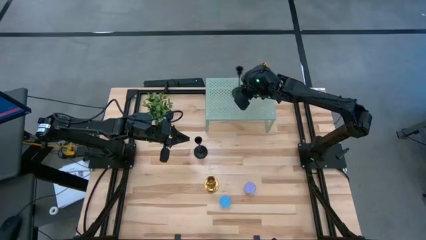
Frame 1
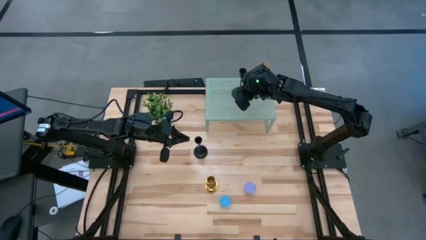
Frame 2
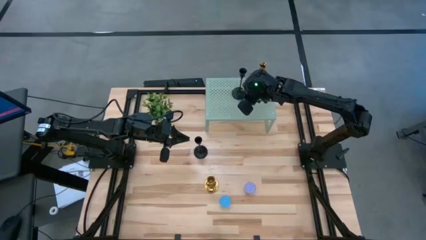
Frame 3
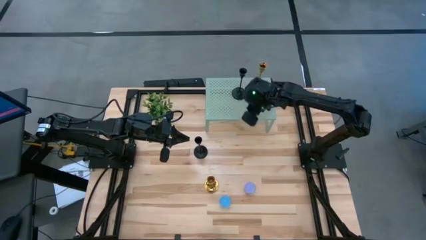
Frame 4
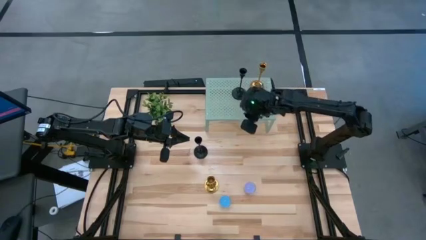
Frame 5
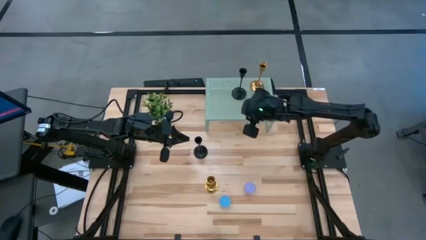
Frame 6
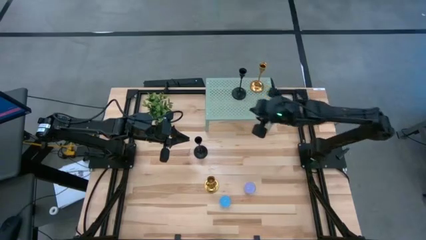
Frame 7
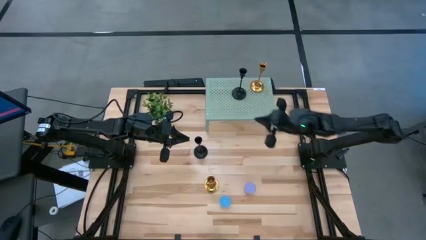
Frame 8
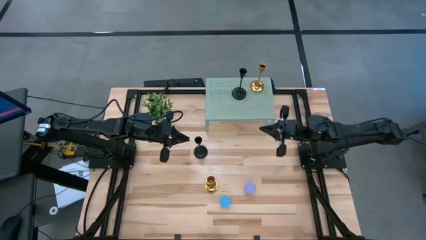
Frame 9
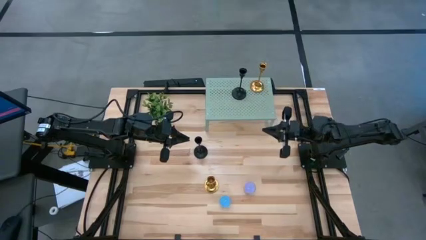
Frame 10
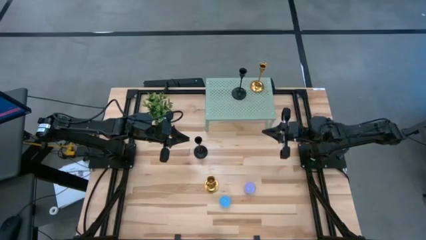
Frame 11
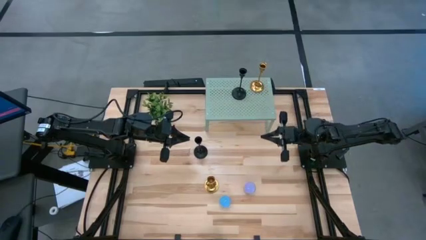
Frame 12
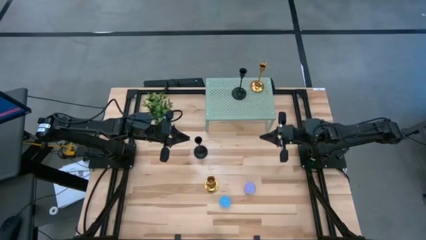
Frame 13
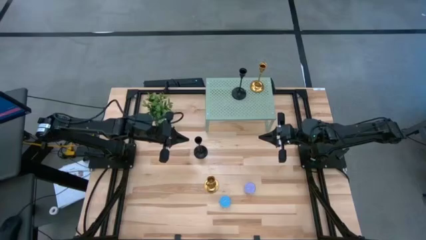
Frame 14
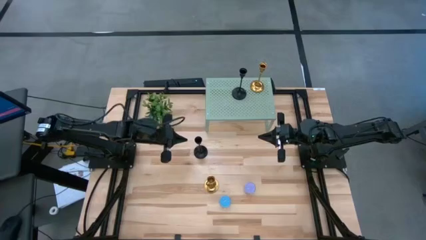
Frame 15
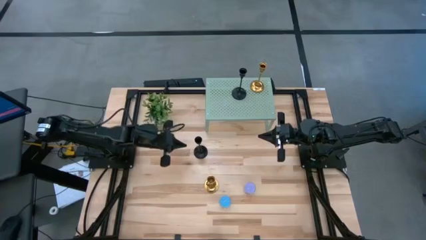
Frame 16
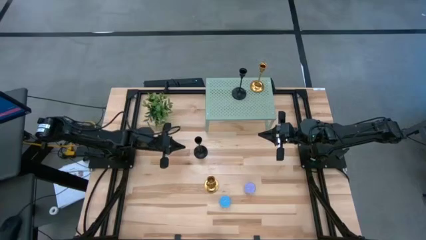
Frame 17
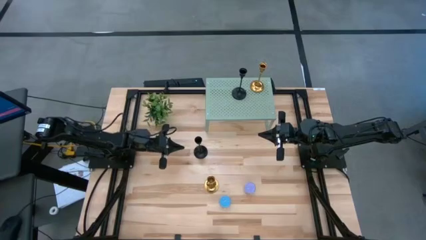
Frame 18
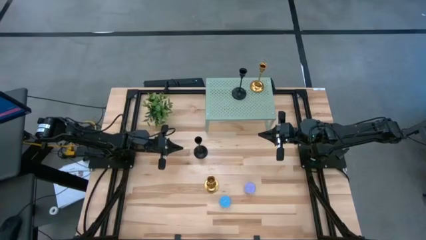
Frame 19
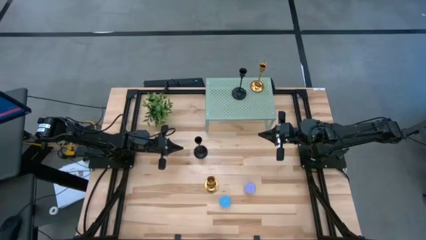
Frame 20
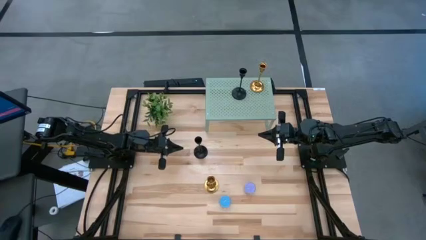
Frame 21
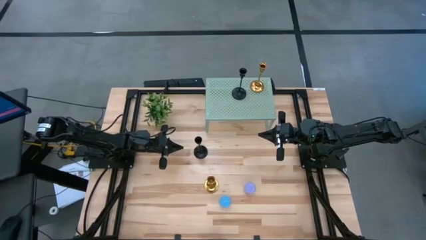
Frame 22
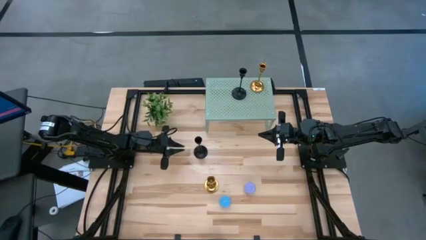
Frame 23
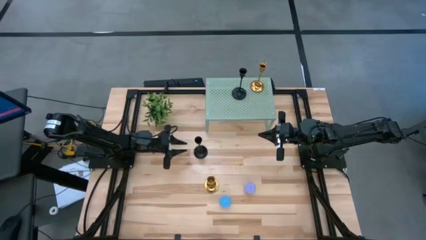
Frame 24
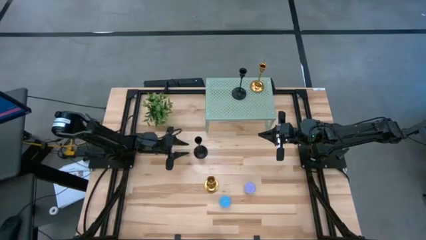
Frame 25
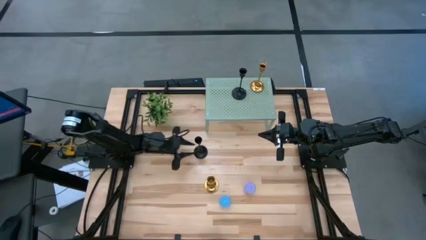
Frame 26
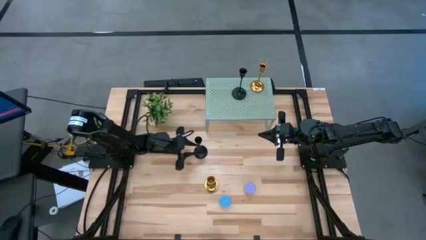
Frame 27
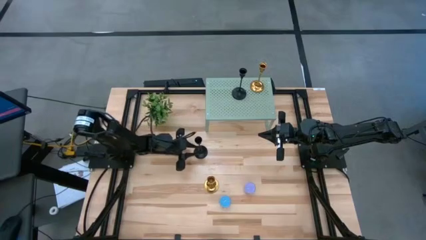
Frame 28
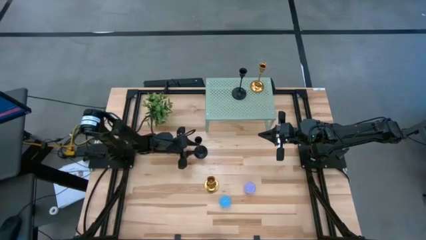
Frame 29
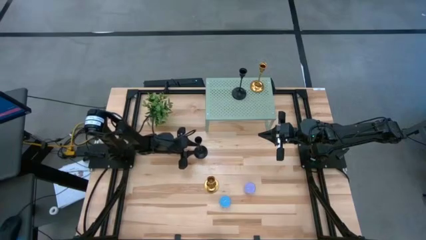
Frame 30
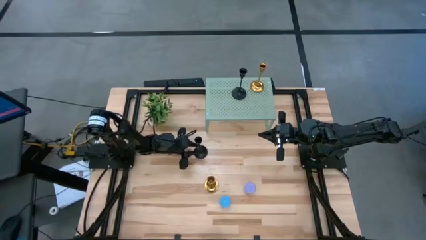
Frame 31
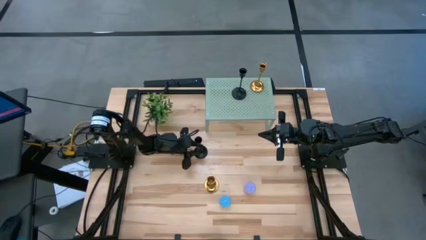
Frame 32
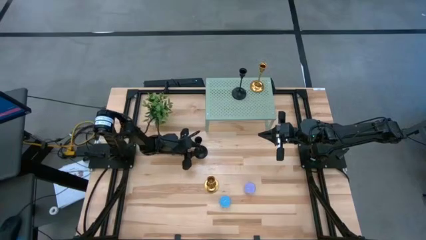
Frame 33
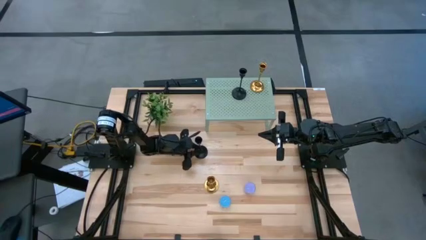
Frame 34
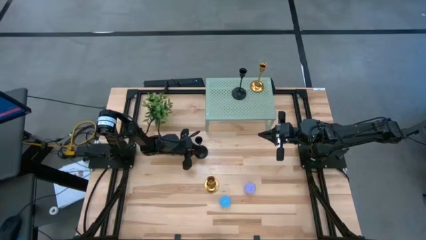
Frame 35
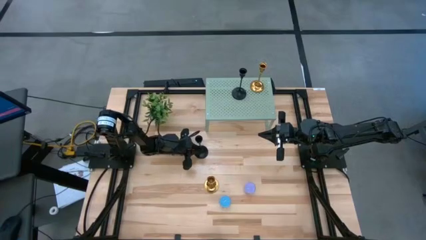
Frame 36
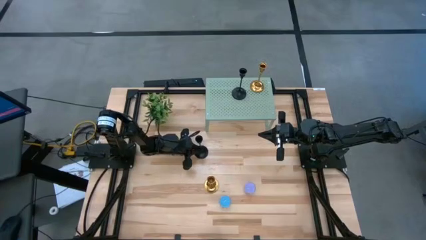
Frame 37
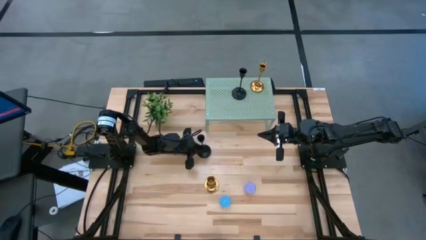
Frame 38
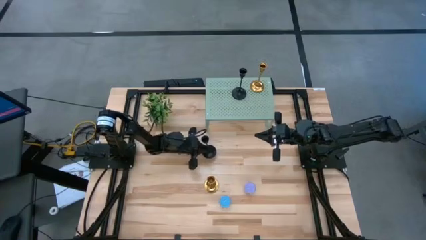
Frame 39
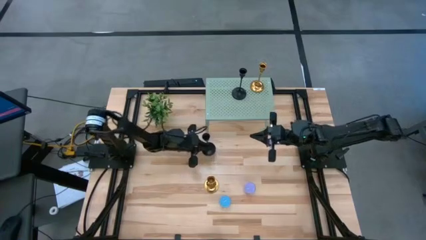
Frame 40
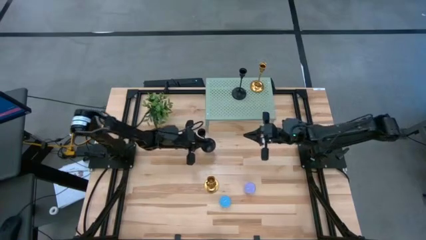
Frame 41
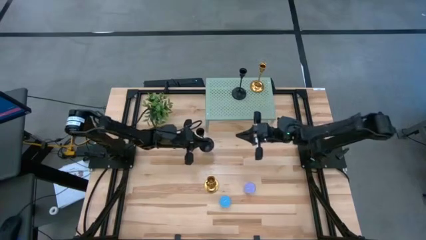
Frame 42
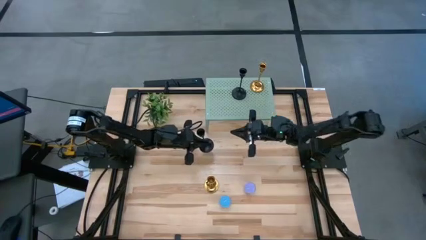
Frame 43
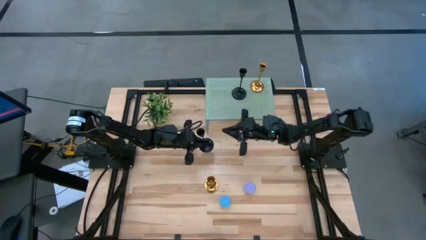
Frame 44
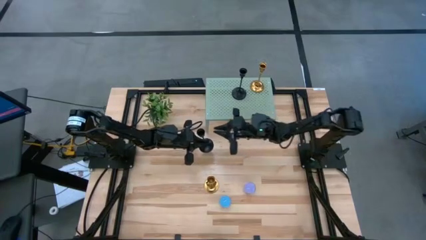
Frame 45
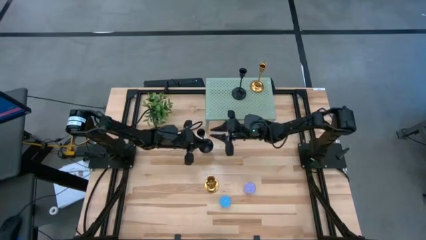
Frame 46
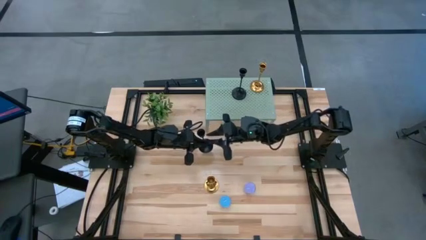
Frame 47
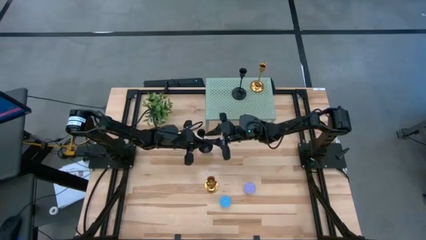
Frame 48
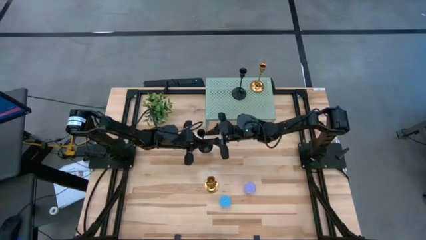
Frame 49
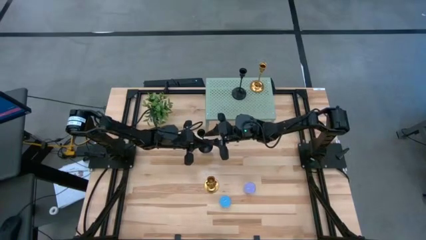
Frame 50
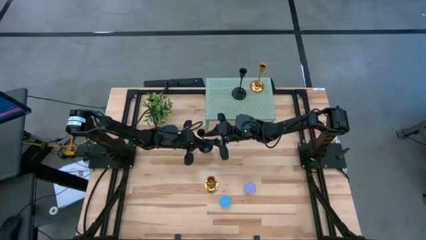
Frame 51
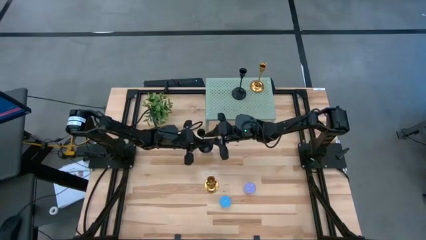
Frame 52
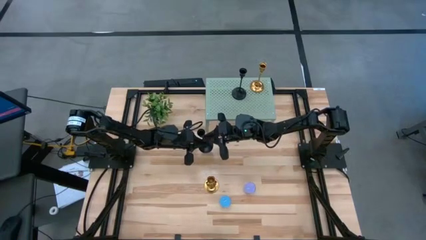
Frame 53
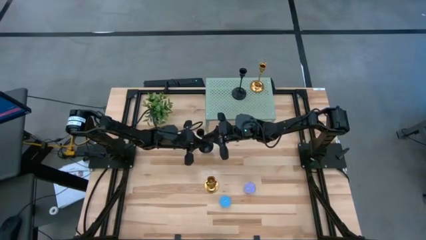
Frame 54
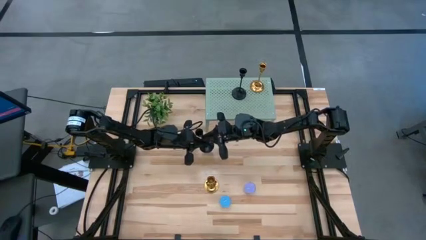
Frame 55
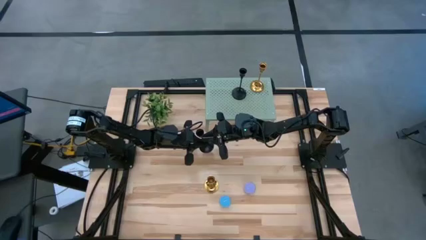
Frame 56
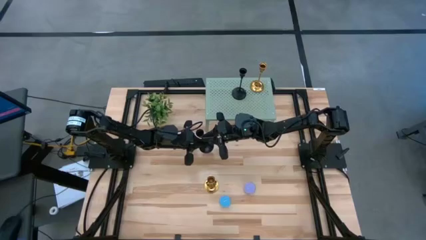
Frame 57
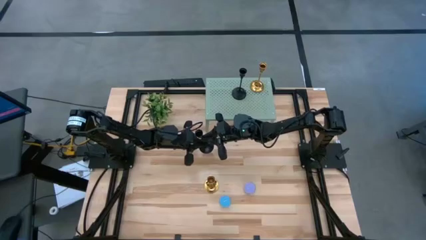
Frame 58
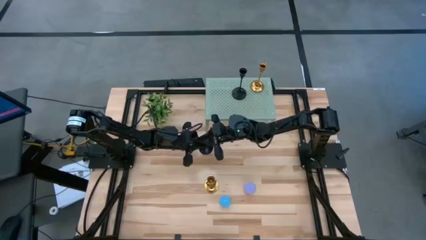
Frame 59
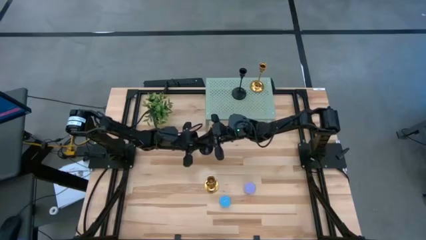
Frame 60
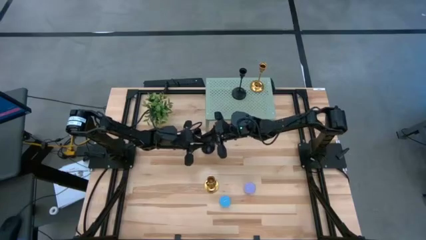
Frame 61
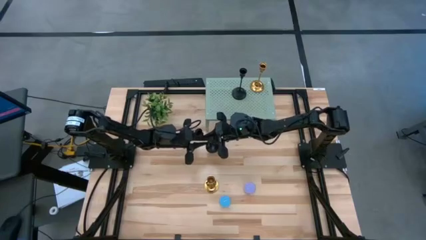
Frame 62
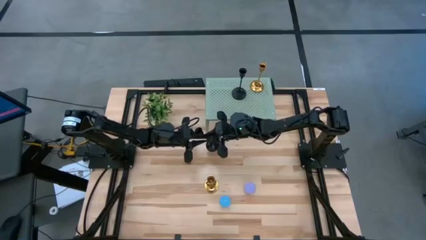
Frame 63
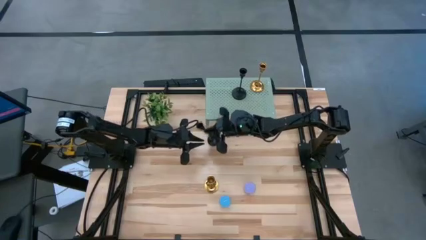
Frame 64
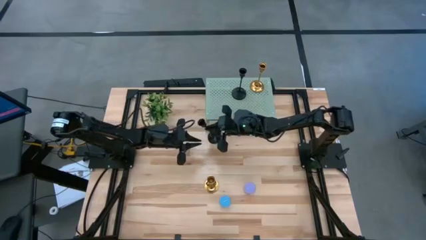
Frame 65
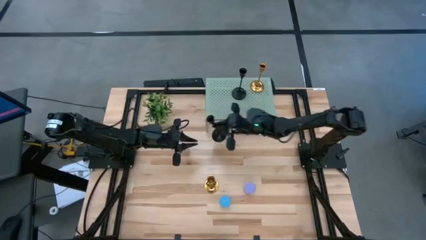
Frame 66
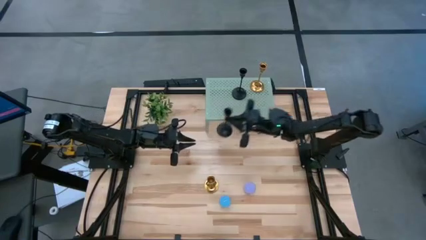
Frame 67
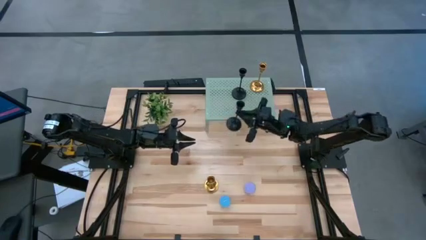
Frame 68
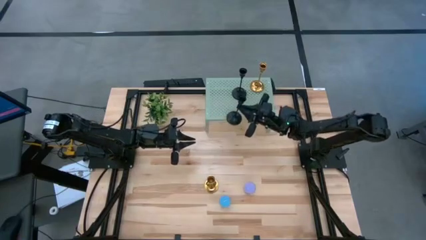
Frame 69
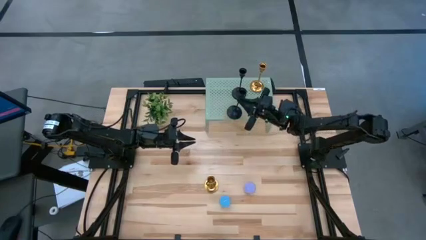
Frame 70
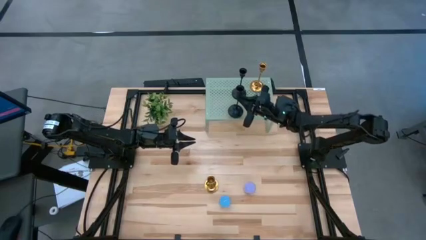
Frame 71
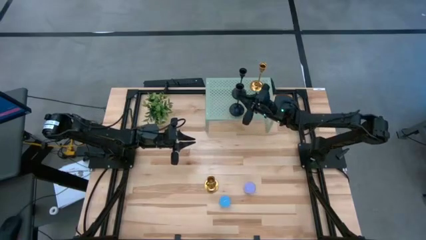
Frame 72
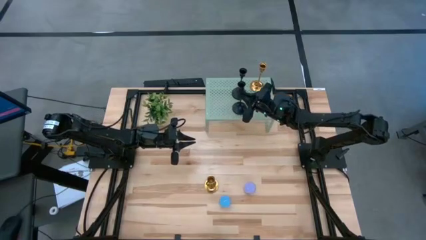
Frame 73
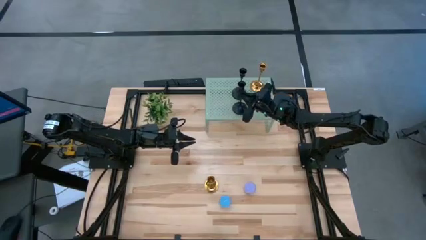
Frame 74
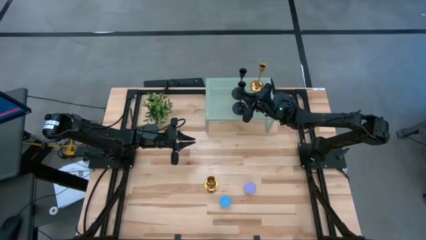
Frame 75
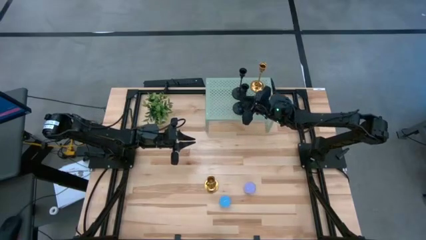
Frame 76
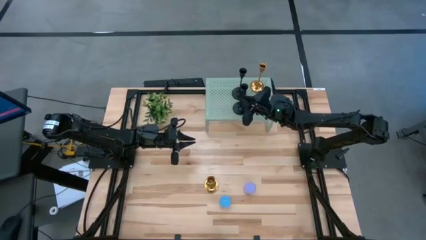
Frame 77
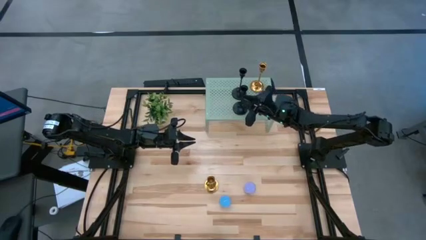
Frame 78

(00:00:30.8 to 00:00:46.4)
Task: Pick & Place candle stick holders
Align the black candle holder with the other black candle holder on the shelf
